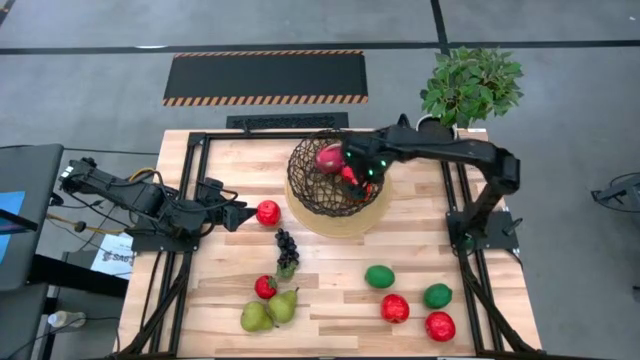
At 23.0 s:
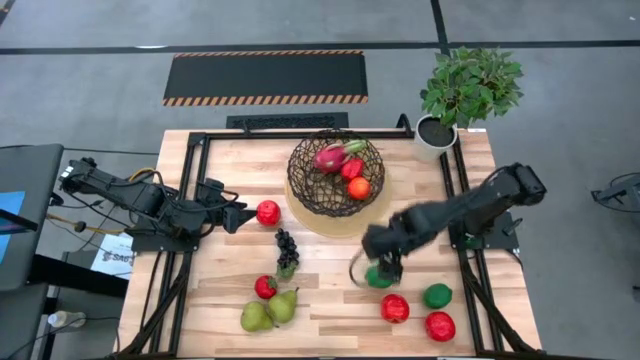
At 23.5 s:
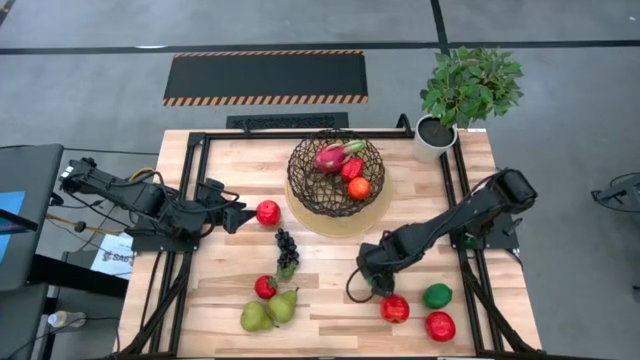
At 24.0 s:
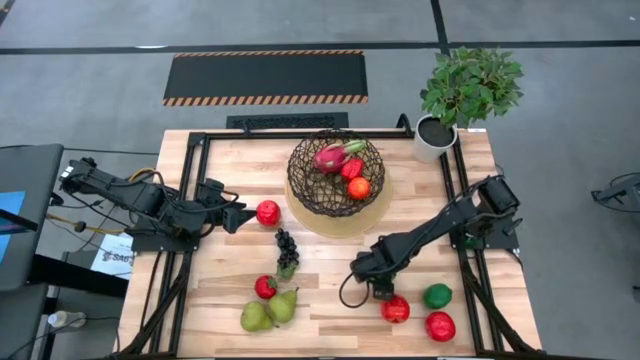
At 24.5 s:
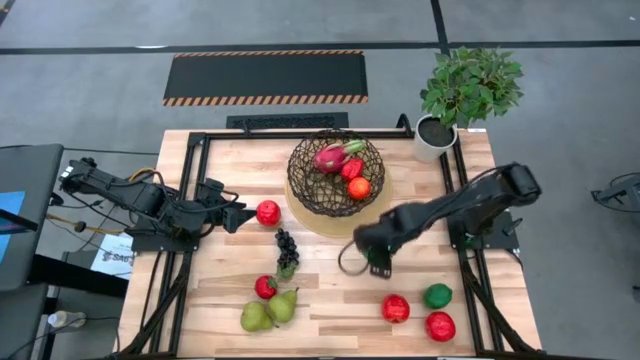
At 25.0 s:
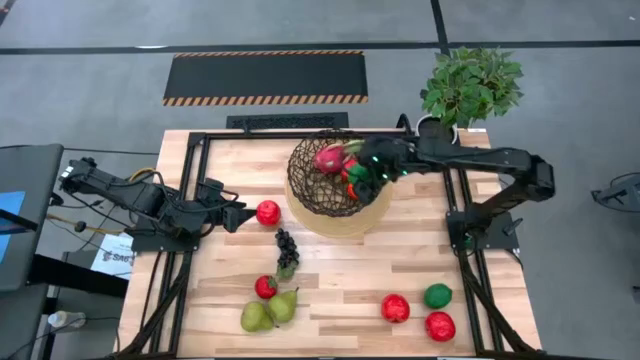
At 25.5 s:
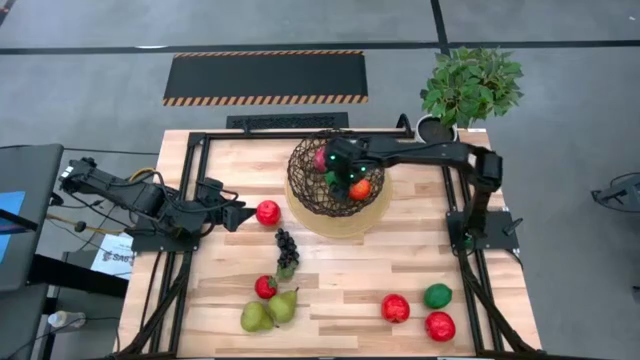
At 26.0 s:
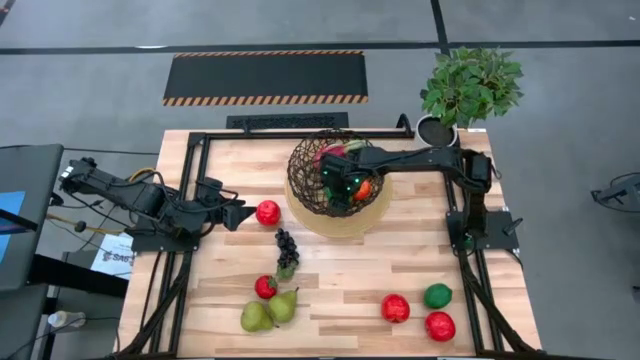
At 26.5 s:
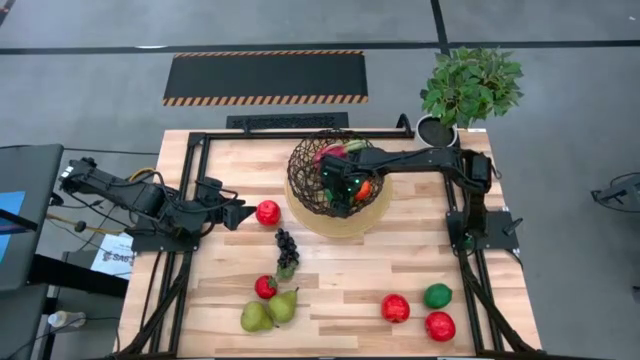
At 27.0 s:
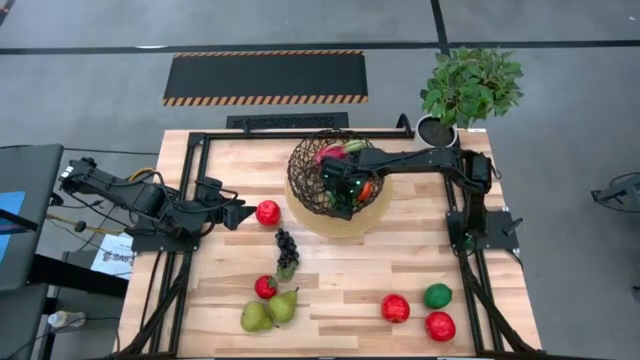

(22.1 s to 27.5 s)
Task: Build produce basket
Put the green lime into the black wire basket

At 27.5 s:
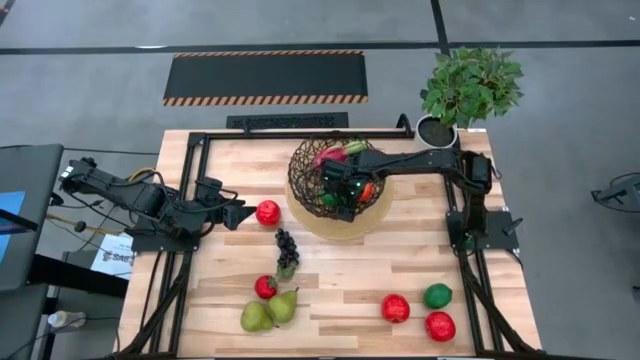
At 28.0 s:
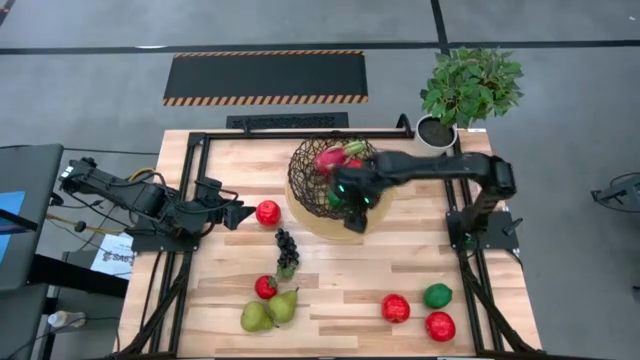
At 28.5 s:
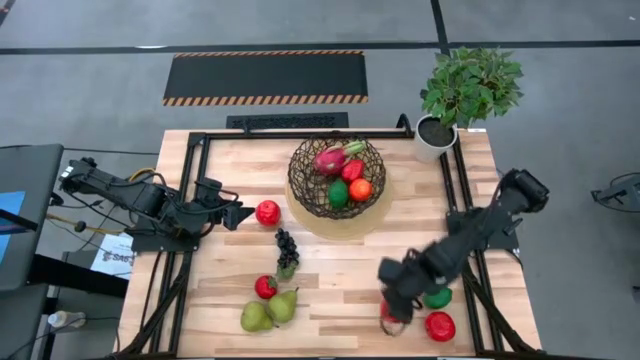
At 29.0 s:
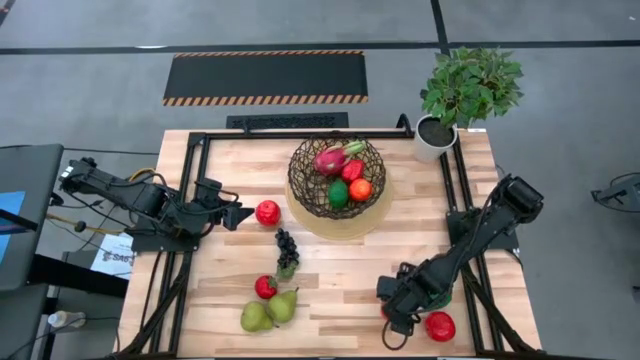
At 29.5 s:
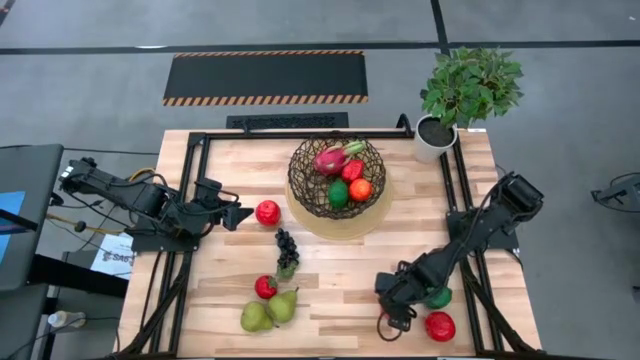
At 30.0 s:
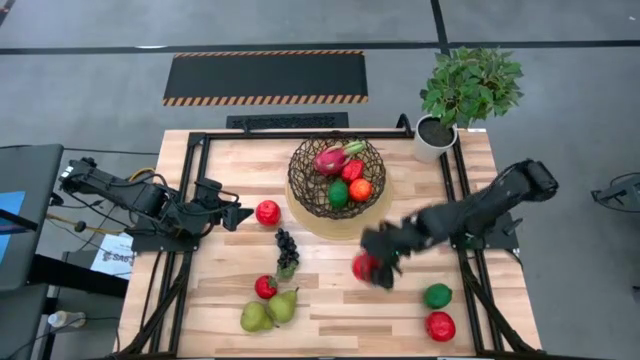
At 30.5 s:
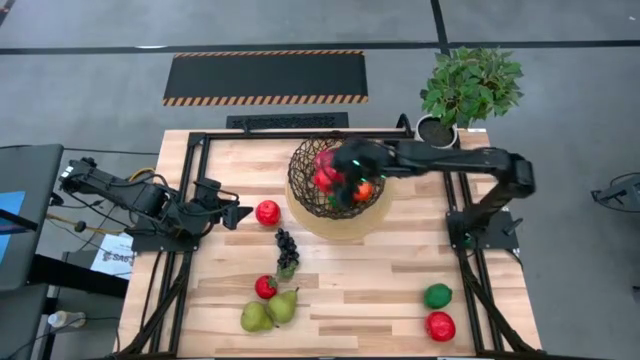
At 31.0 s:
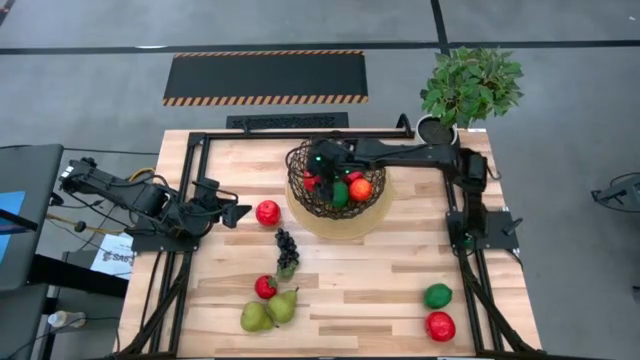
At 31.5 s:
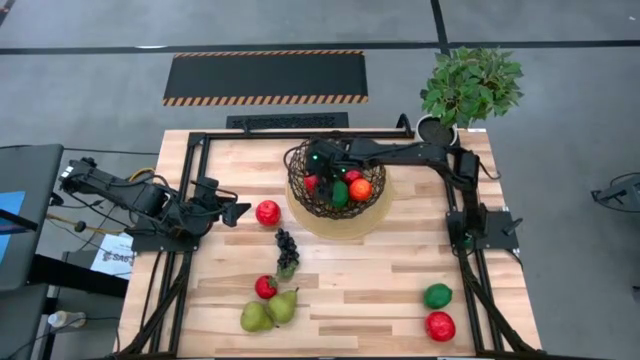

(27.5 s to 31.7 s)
Put the red apple into the black wire basket

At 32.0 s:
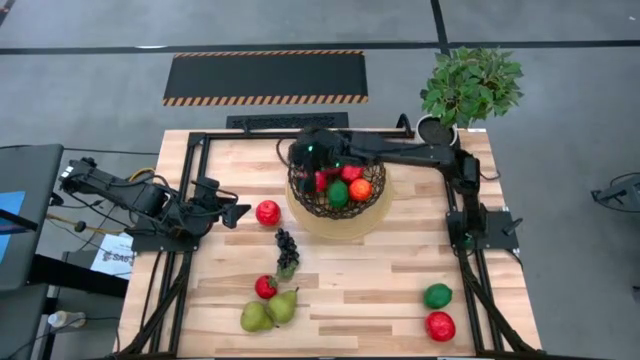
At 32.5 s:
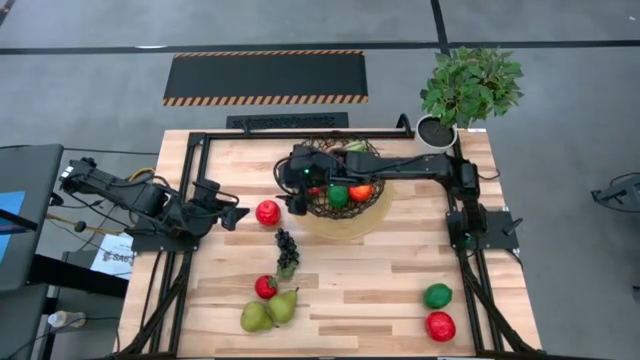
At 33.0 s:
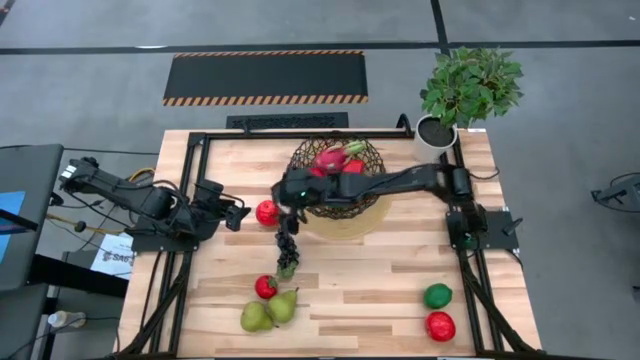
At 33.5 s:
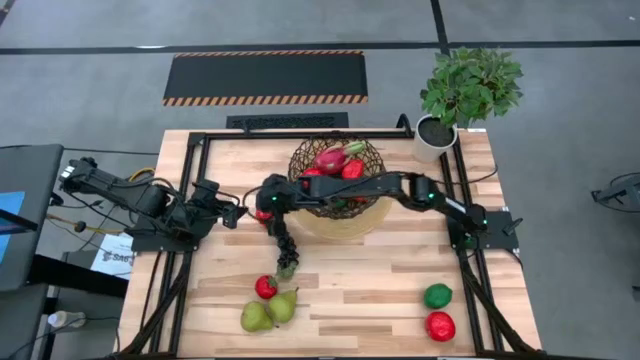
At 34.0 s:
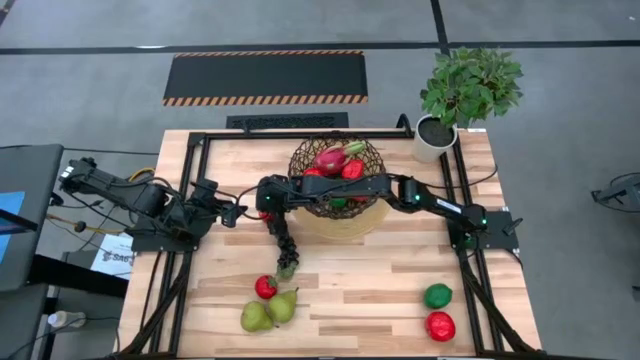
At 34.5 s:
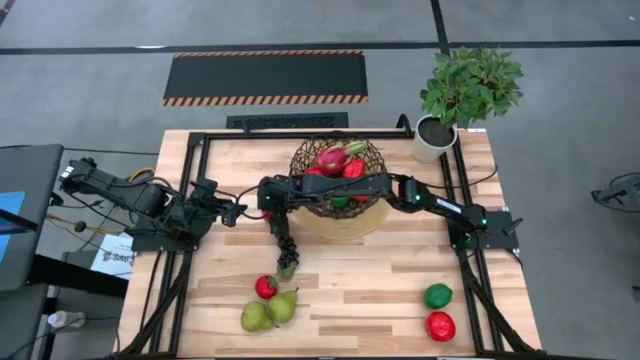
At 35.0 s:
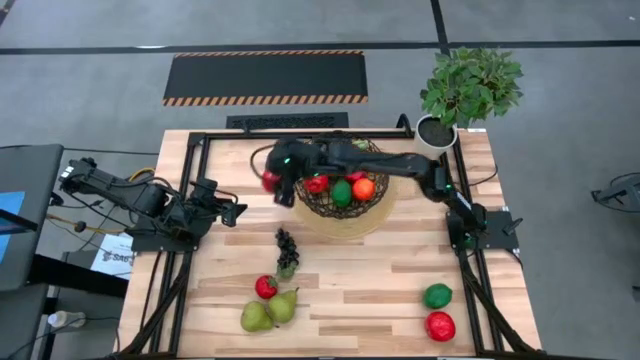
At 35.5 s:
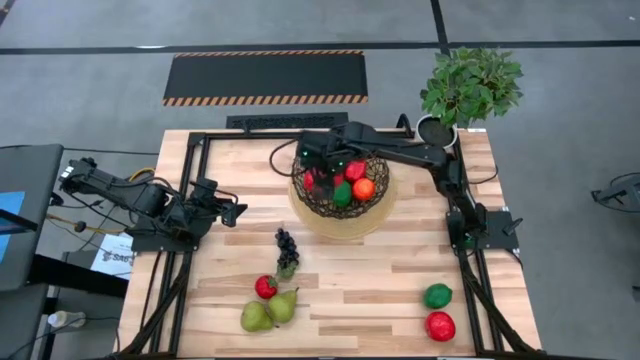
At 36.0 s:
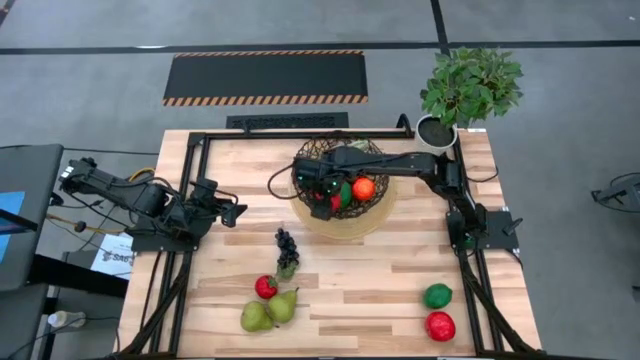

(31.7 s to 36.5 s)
Put the red apple into the black wire basket

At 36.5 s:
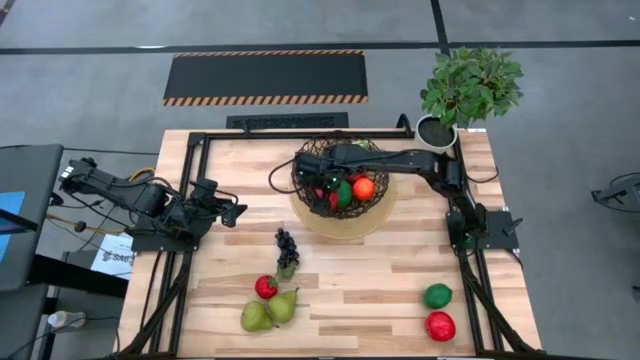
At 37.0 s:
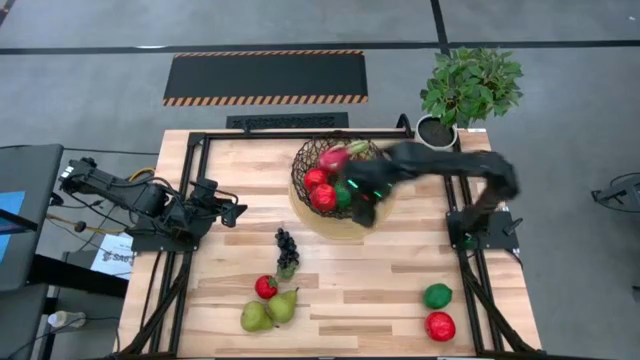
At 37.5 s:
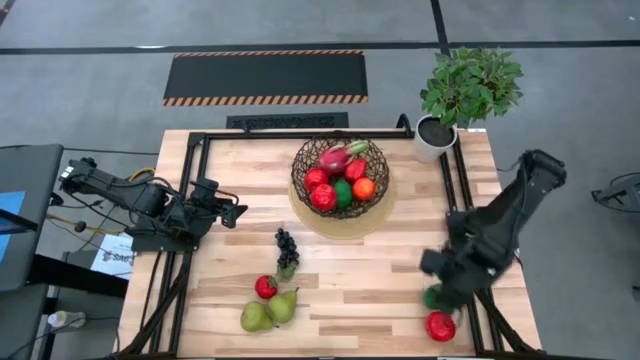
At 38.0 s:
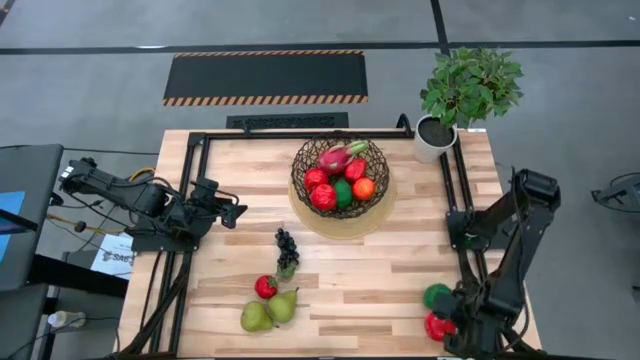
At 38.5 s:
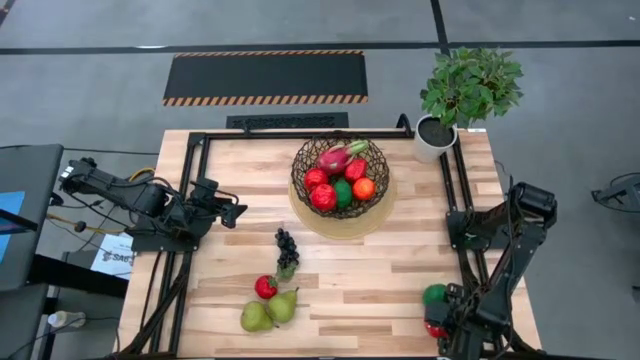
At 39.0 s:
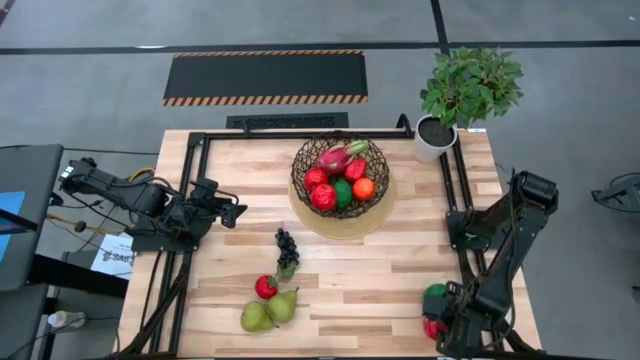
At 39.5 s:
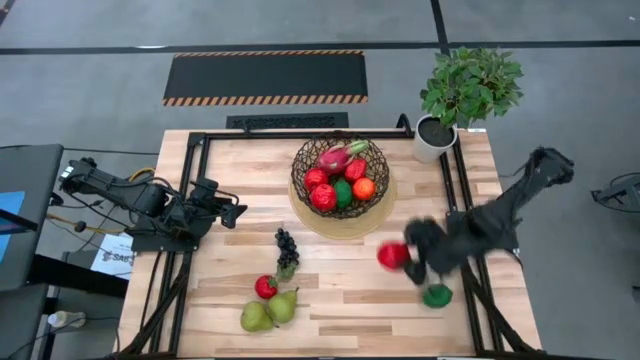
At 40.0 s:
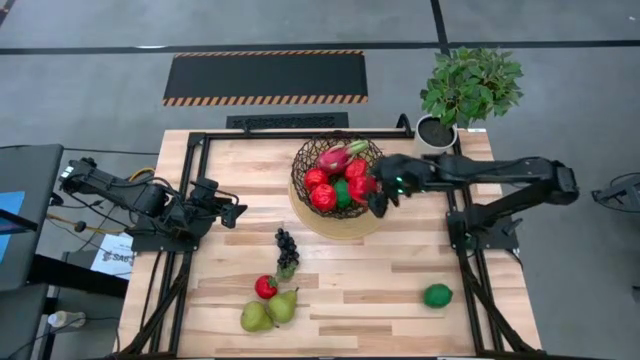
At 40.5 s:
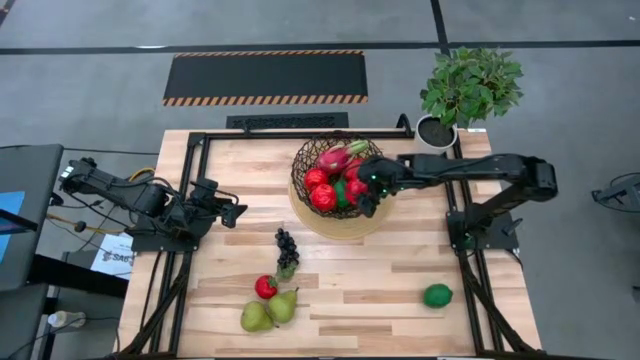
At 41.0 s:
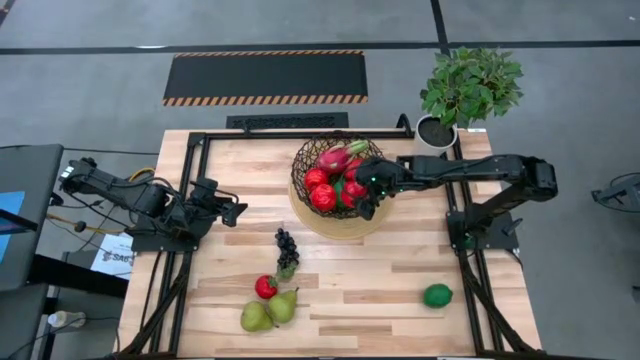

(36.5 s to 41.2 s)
Put the red apple into the black wire basket

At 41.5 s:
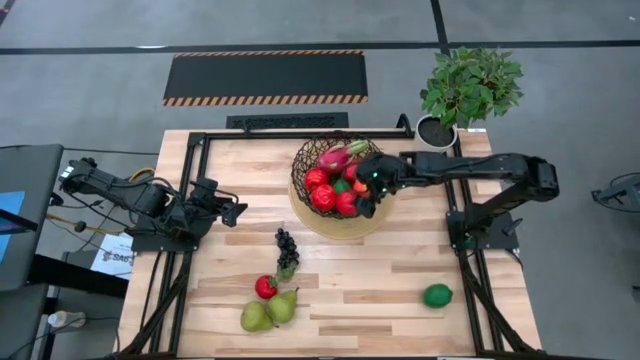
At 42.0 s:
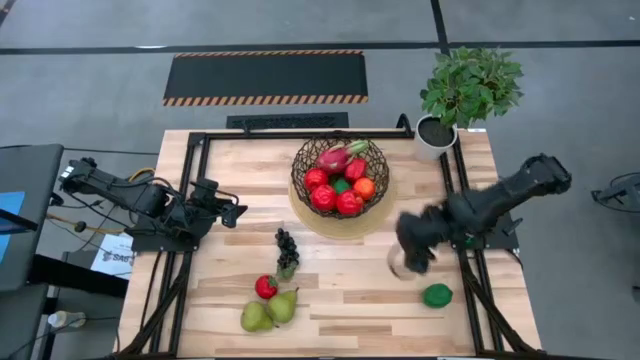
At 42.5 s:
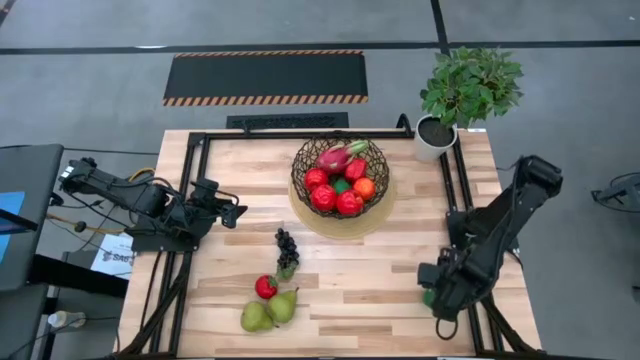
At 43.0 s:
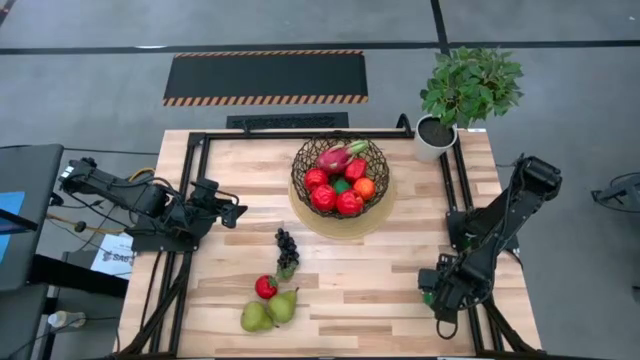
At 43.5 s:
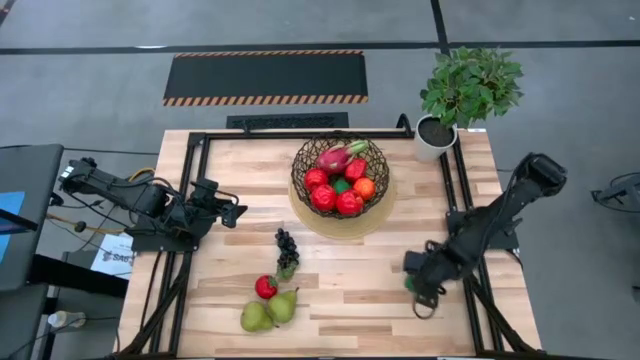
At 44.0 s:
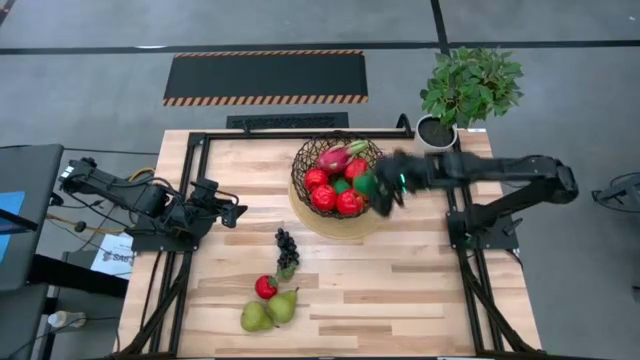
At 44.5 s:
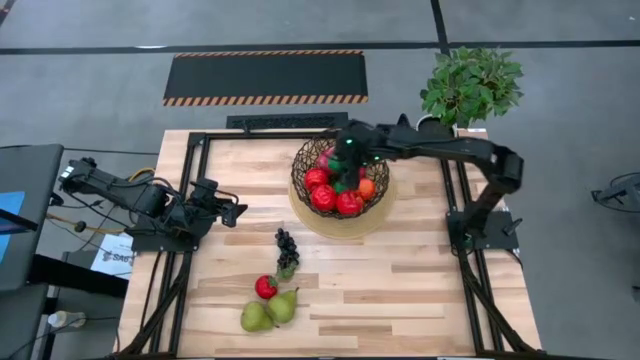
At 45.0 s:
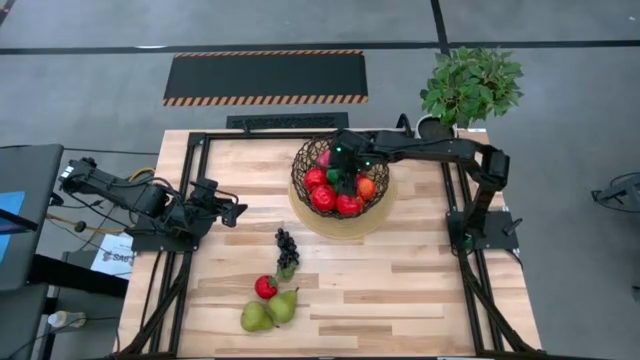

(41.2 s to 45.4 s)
Put the green lime into the black wire basket
